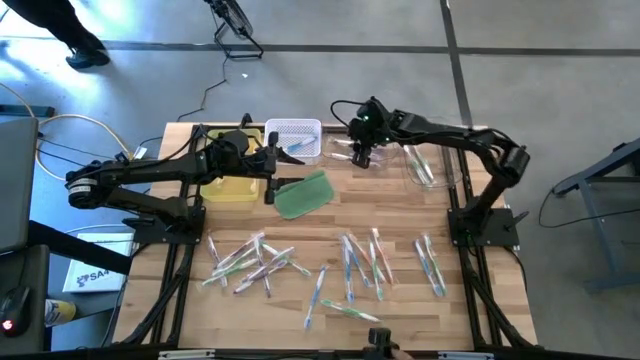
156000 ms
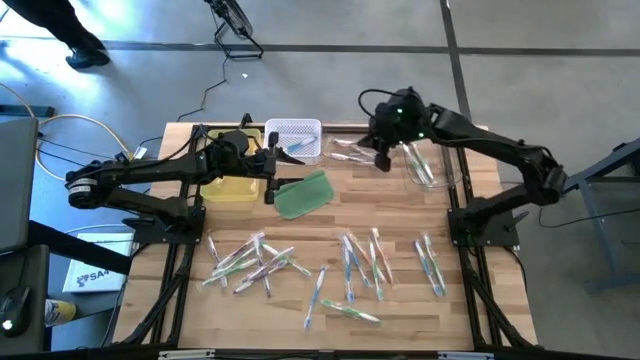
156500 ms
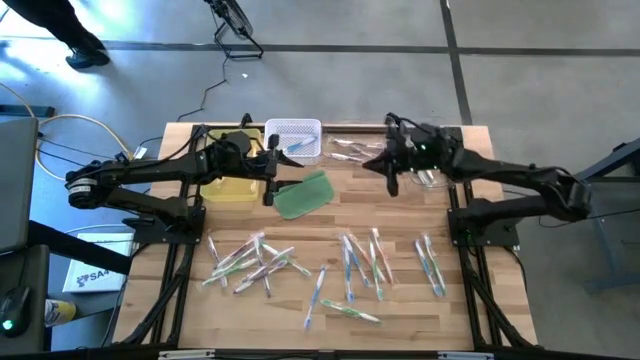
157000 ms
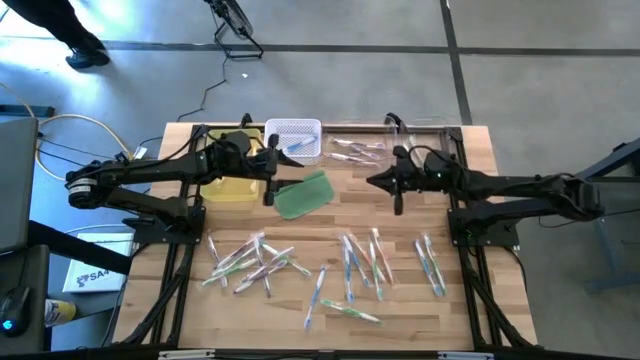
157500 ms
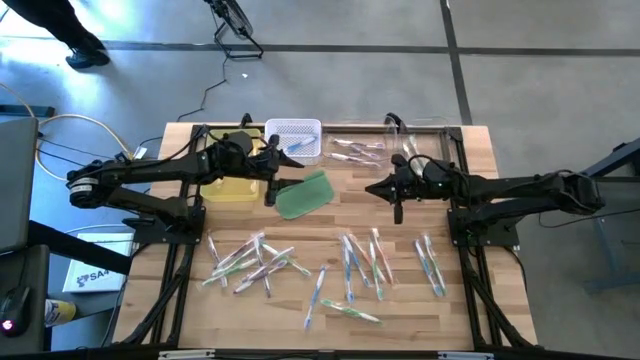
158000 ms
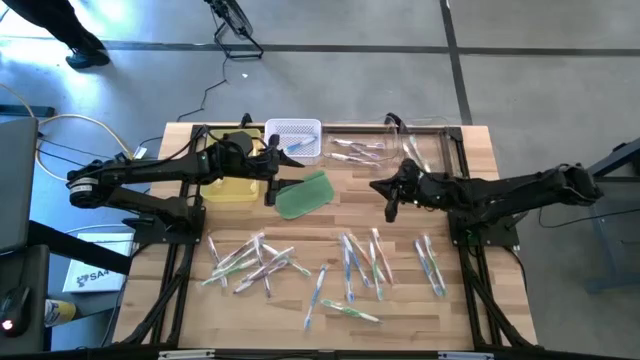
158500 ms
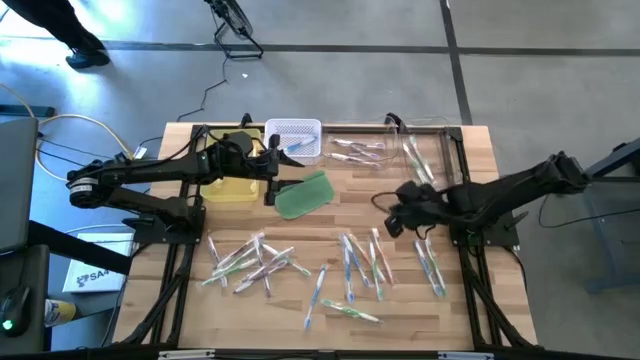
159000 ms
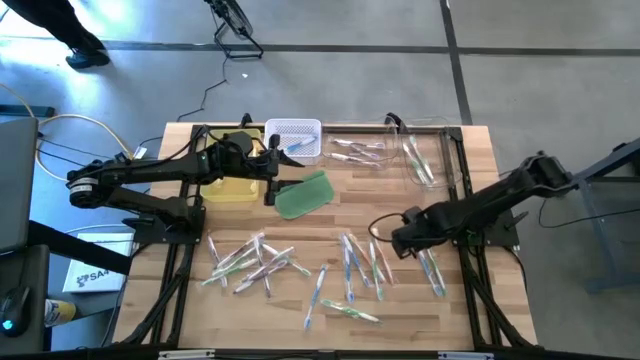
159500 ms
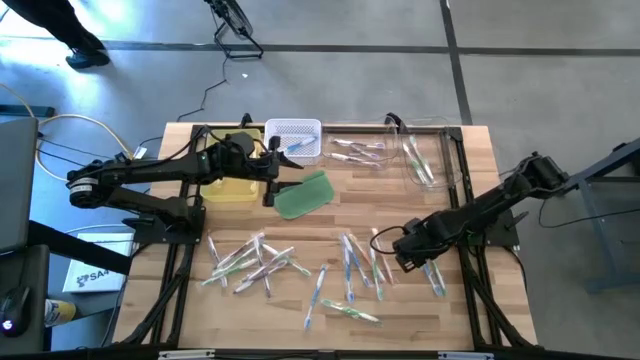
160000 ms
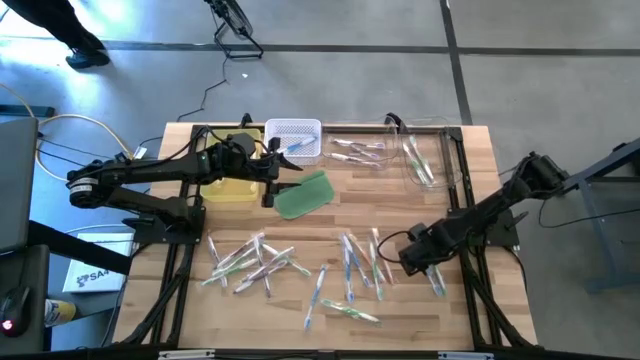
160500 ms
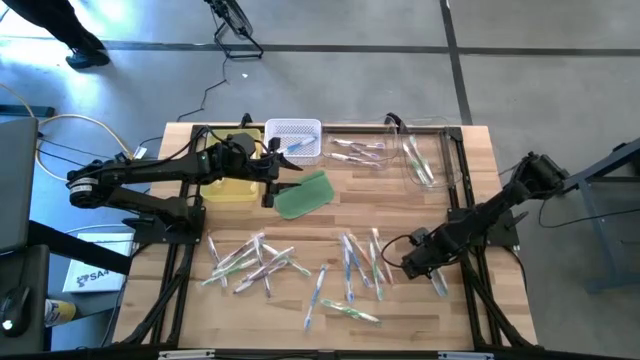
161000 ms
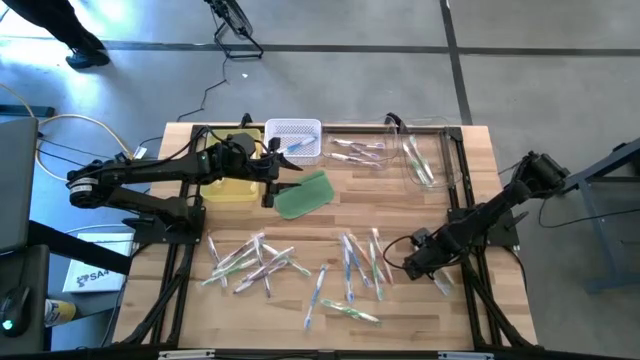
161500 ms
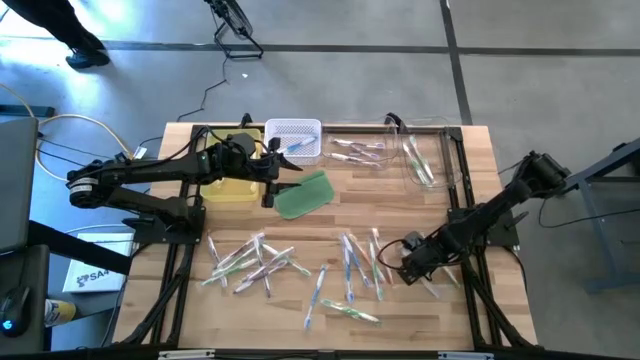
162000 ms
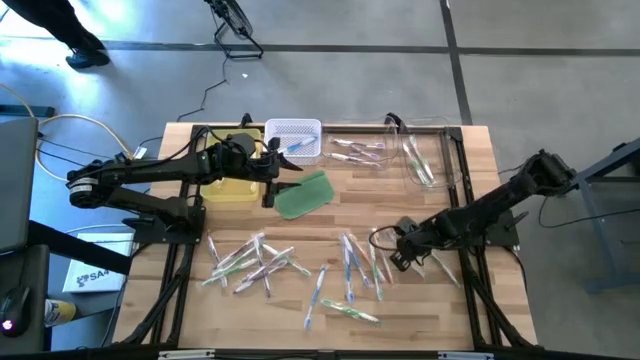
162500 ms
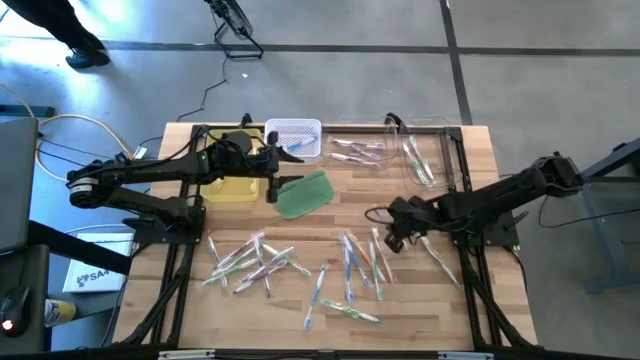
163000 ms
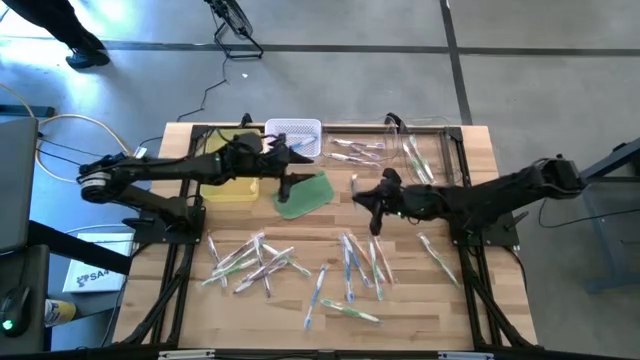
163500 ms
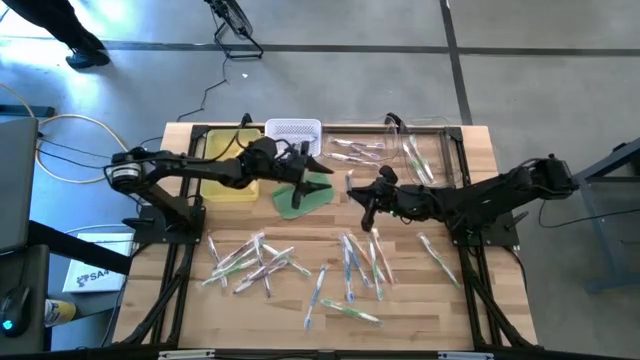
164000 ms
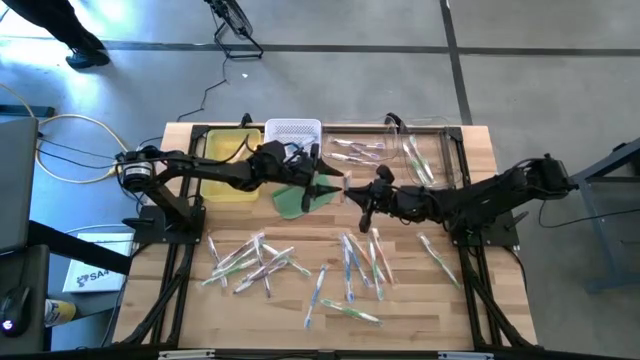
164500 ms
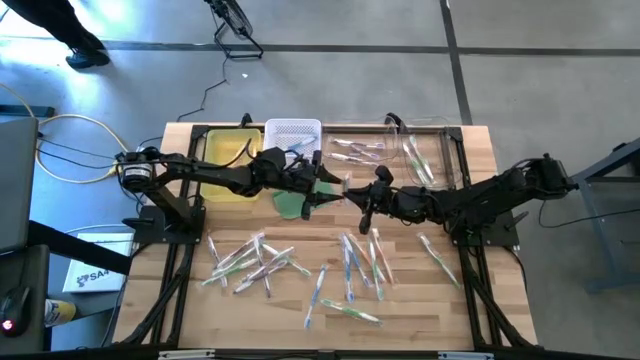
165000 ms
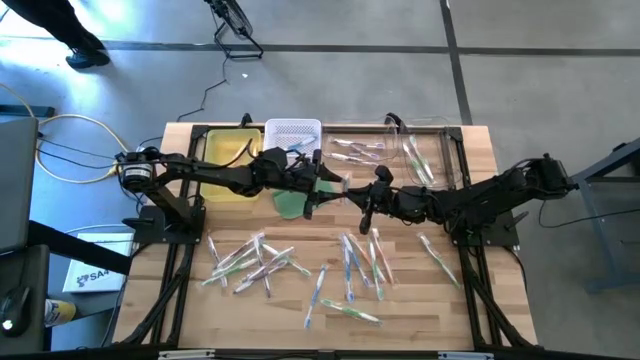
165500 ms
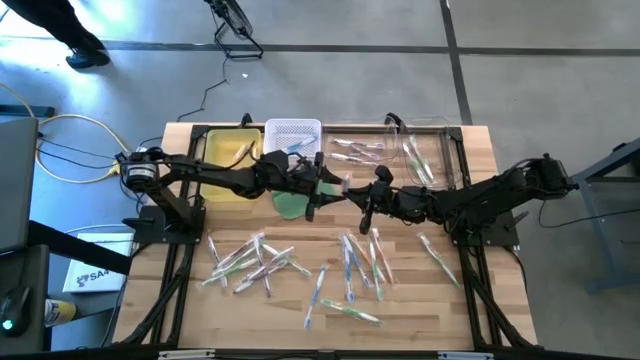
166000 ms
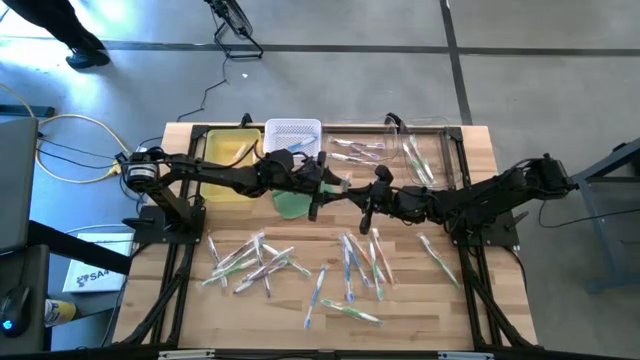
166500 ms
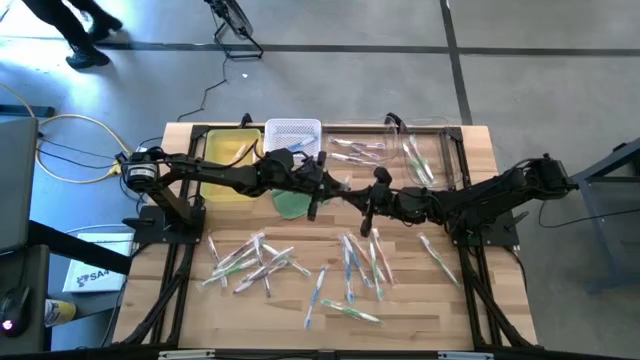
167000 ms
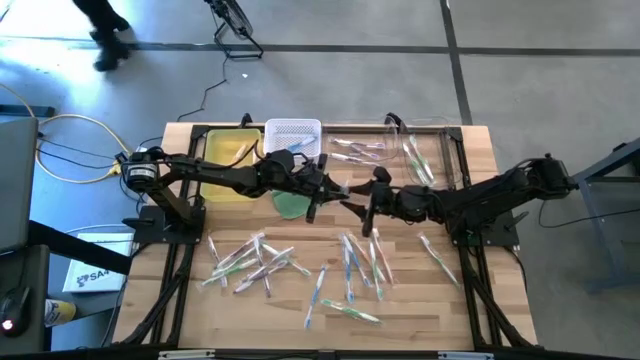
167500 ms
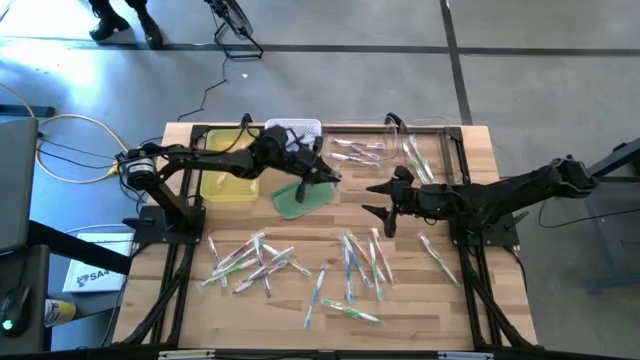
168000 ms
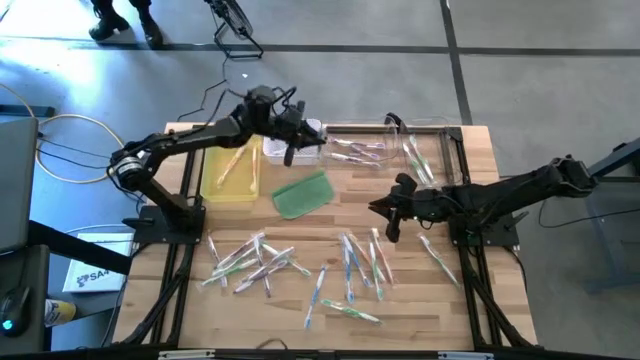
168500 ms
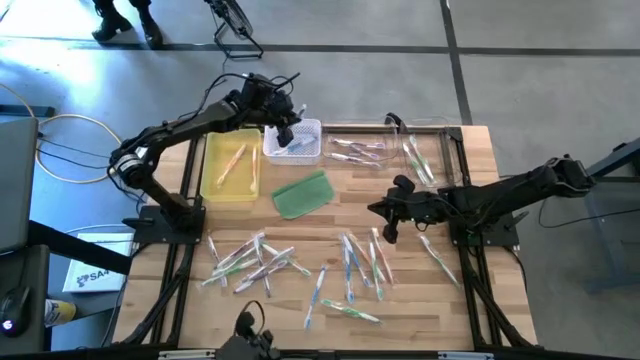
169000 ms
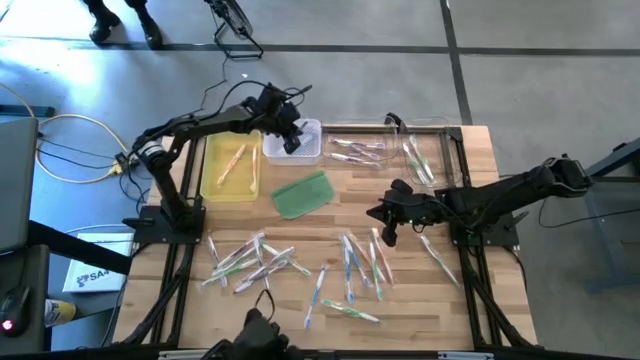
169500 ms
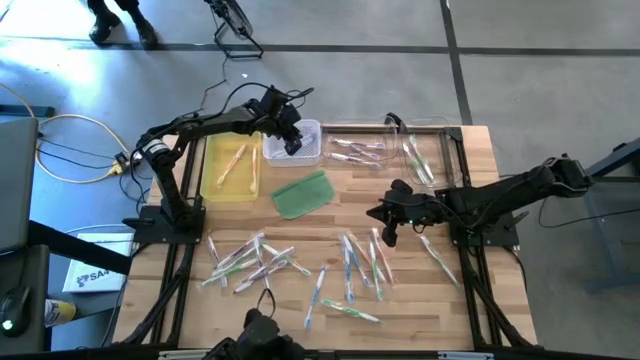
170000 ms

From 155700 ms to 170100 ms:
Task: Pick & Place Toothbrushes
Put the blue toothbrush into the white bin

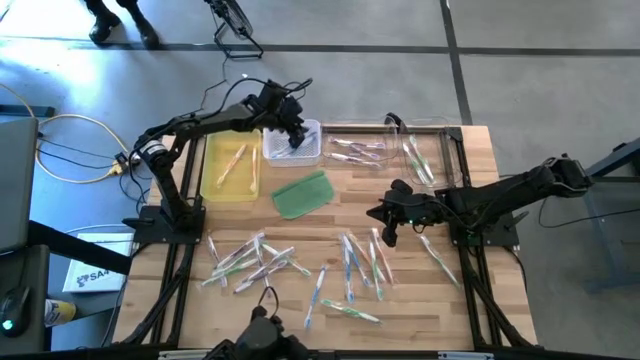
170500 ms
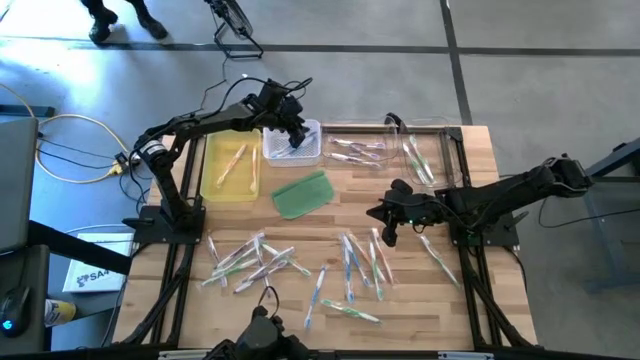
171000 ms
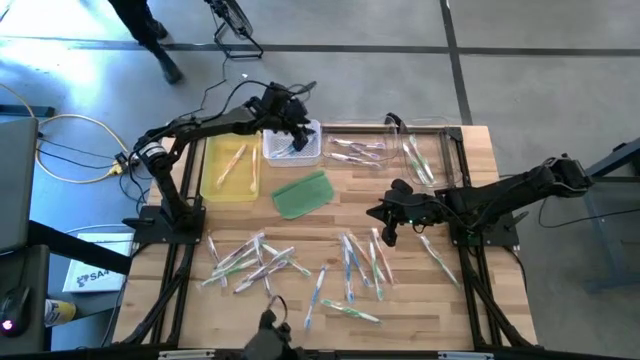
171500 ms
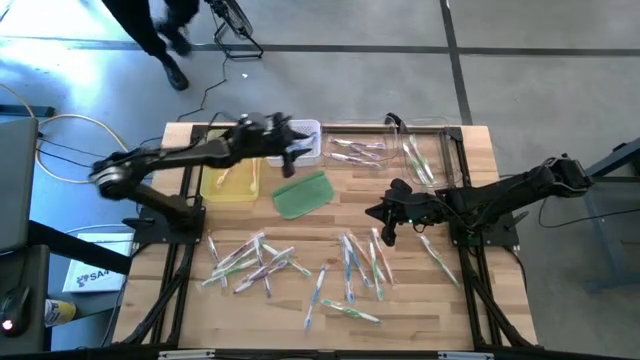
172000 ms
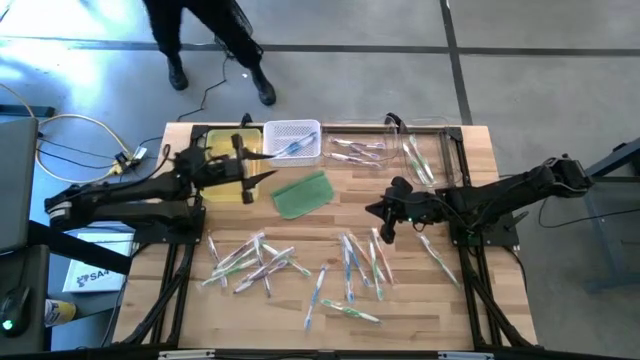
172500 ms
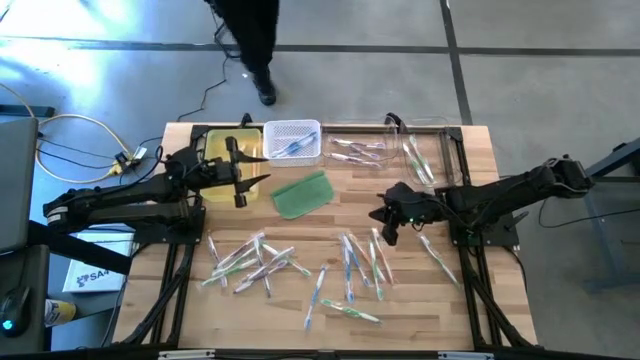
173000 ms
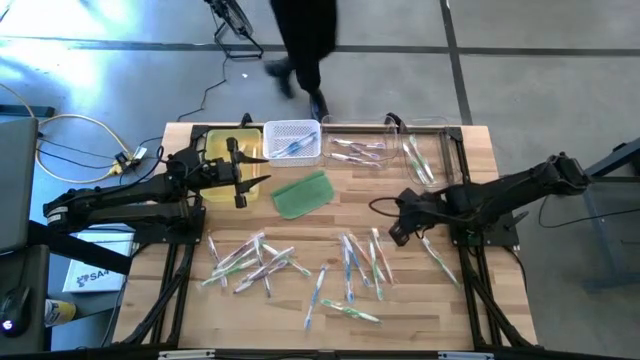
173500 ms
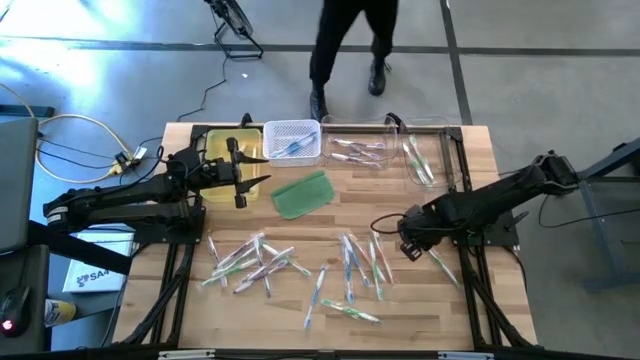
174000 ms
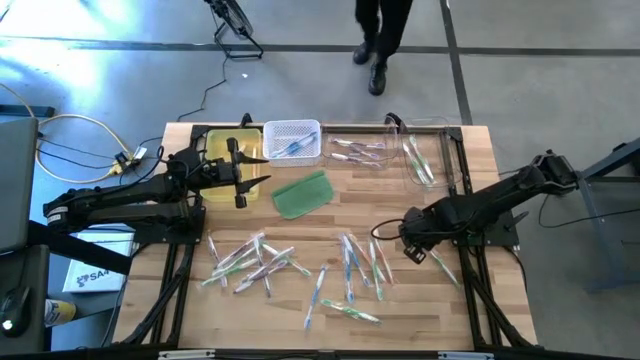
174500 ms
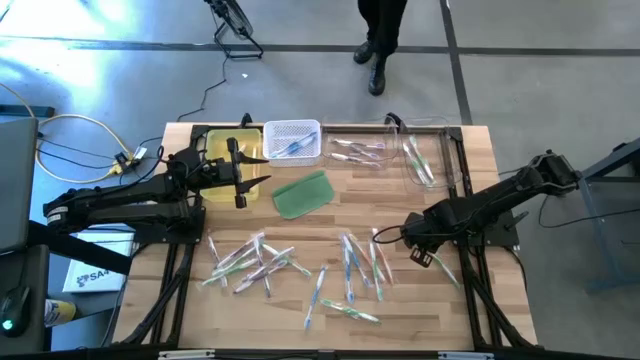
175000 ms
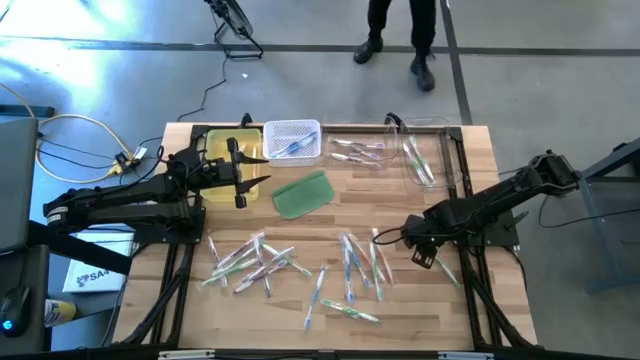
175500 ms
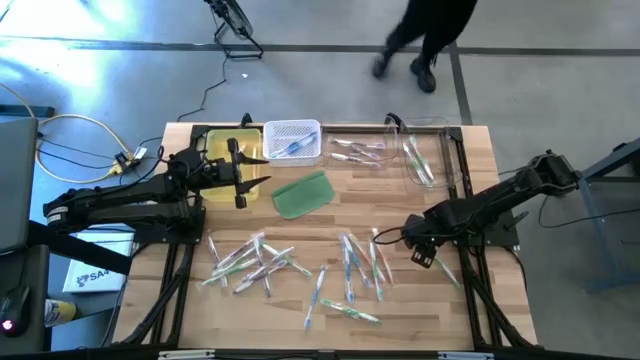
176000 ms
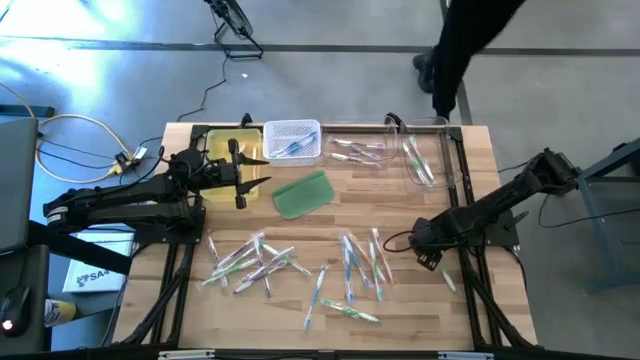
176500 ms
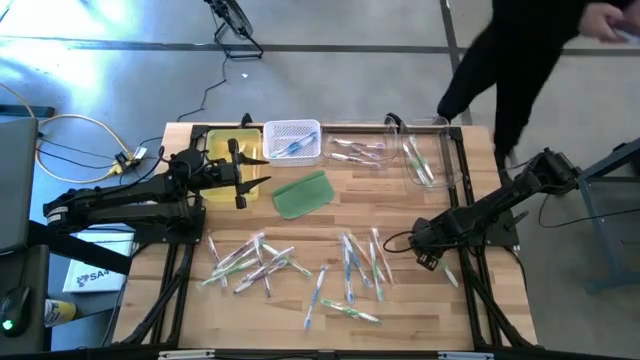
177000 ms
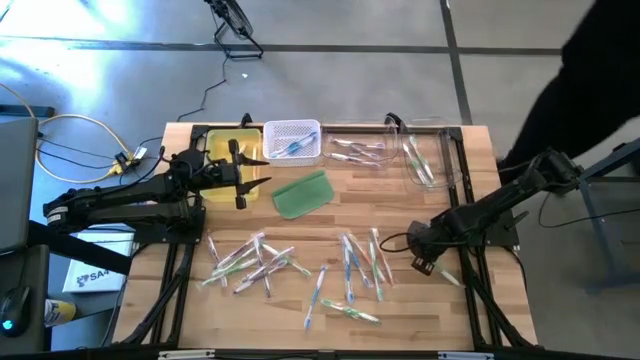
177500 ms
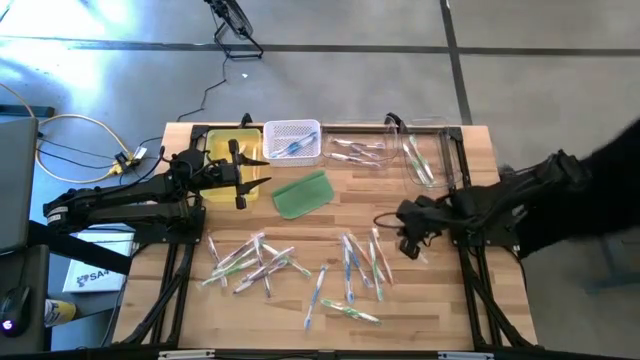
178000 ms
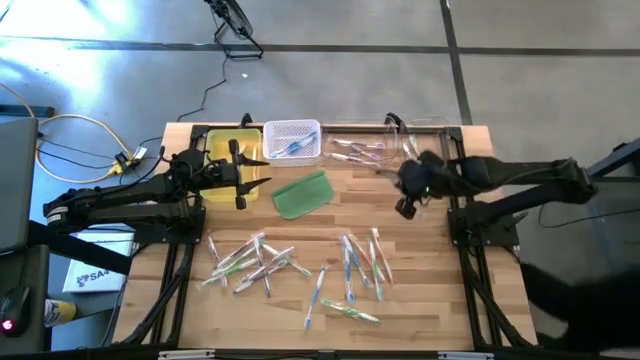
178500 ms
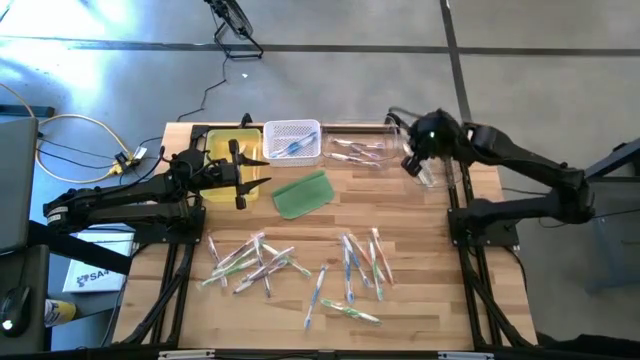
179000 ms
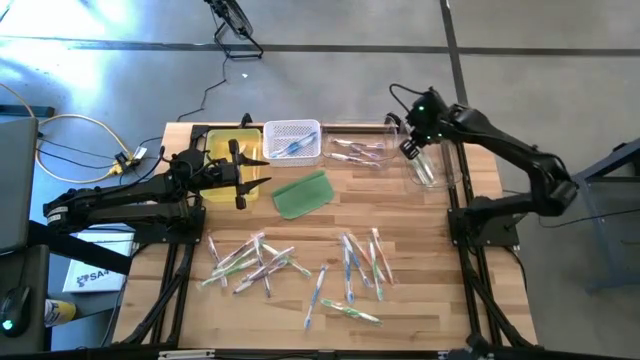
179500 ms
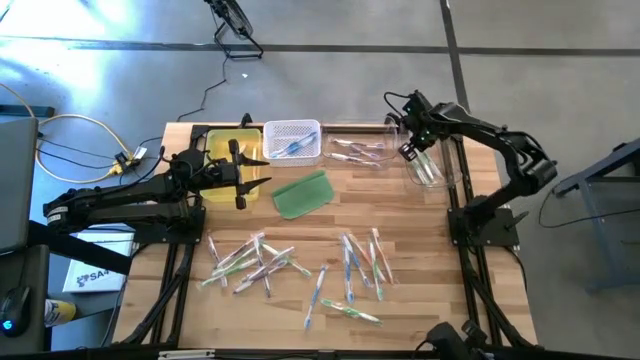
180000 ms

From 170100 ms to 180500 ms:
Put the green toothbrush into the right transparent bin
